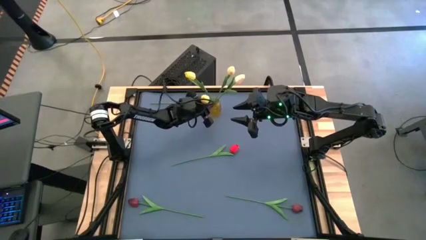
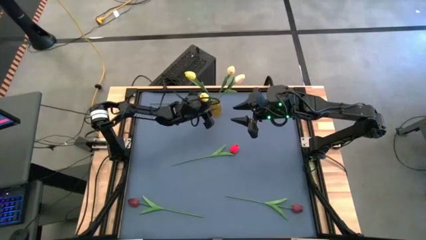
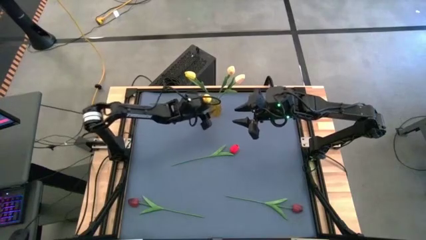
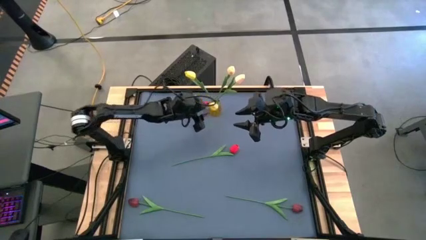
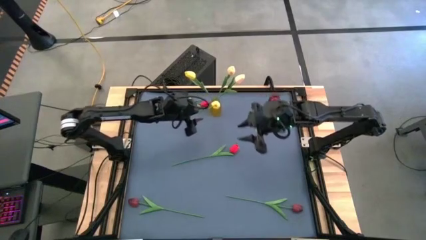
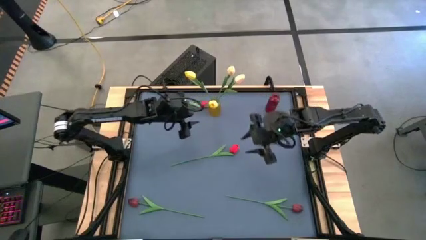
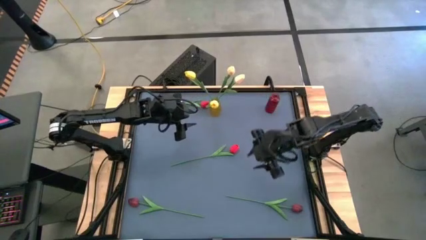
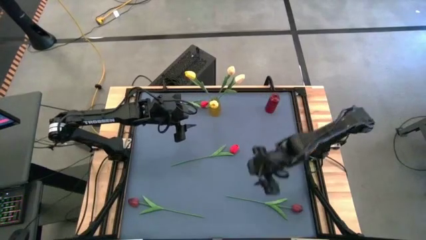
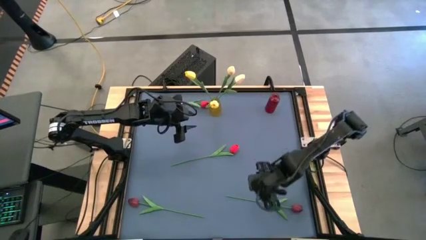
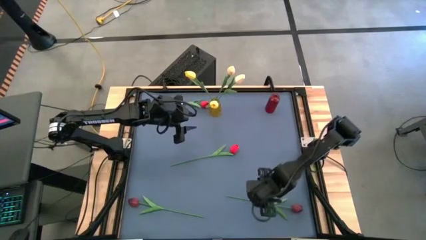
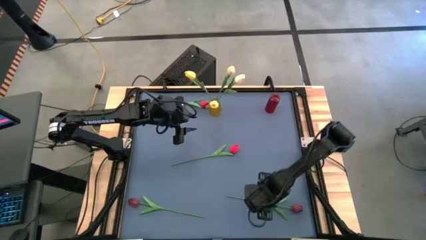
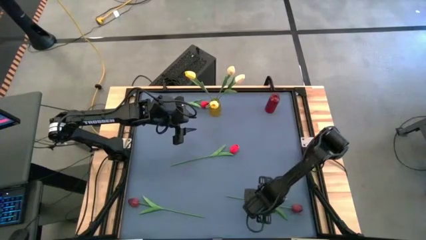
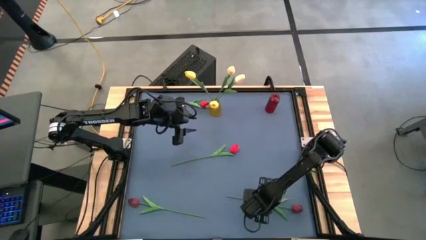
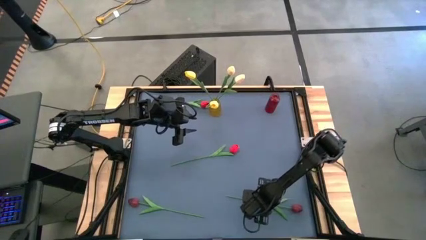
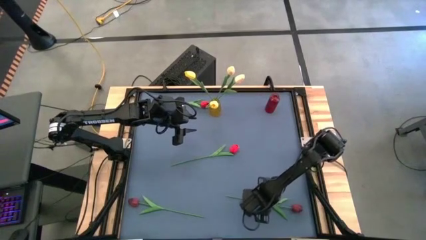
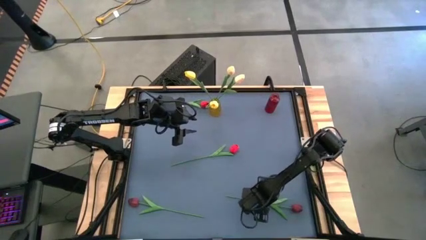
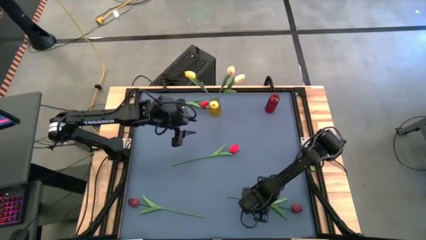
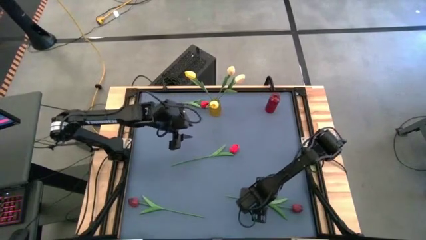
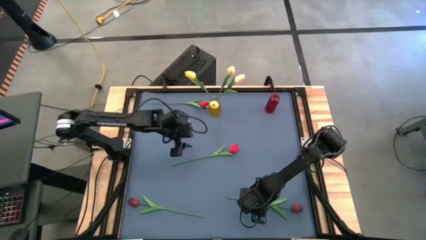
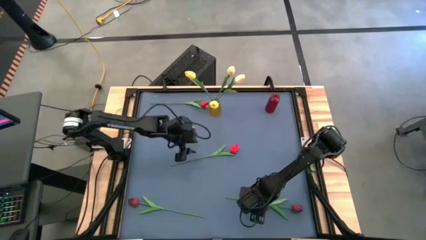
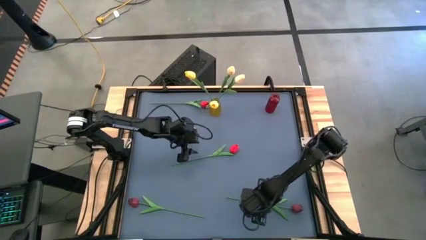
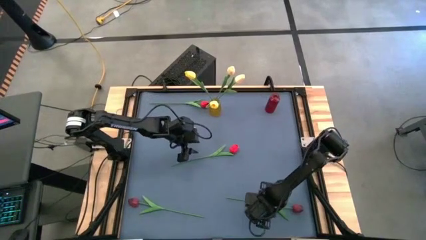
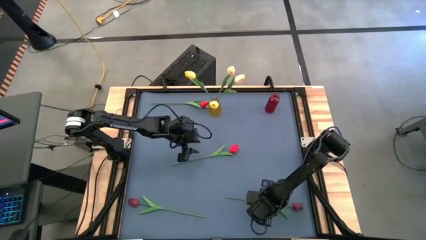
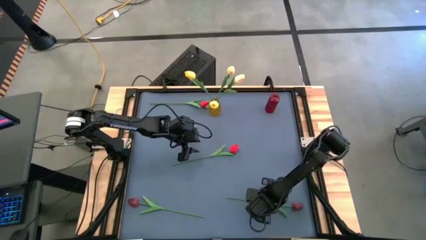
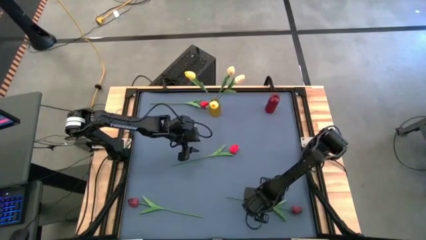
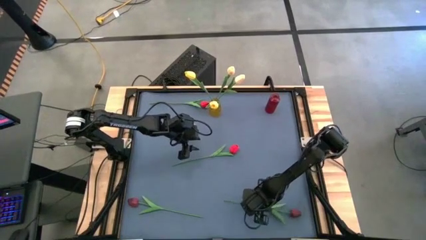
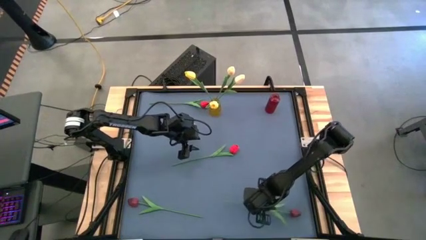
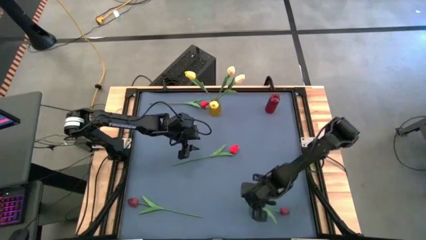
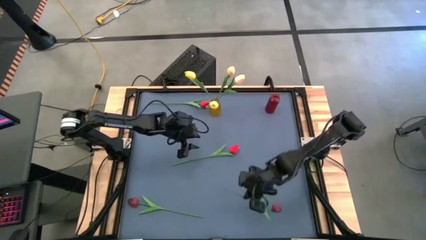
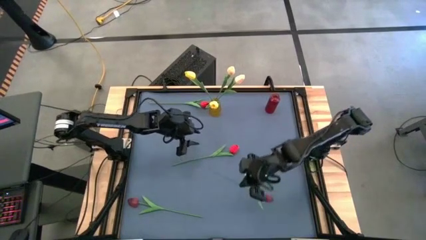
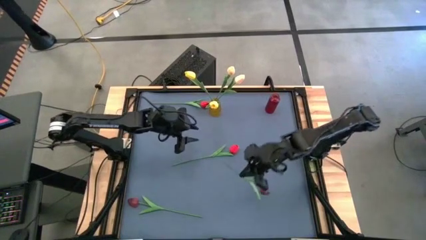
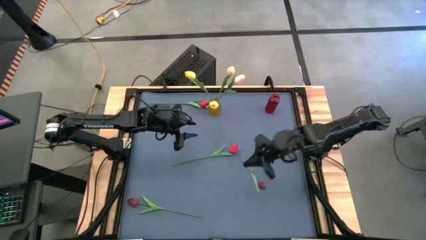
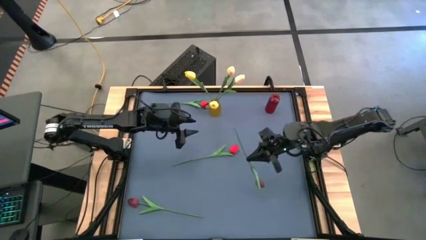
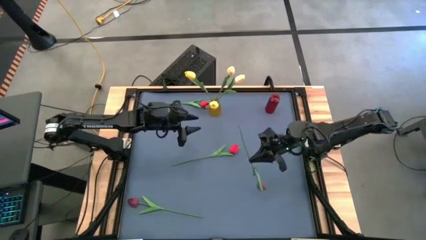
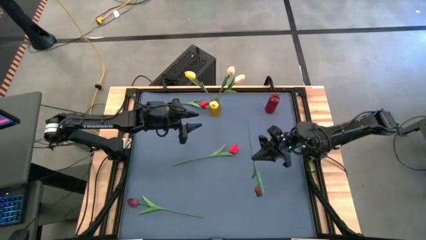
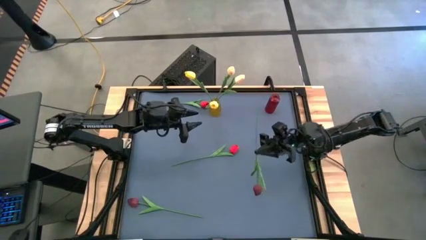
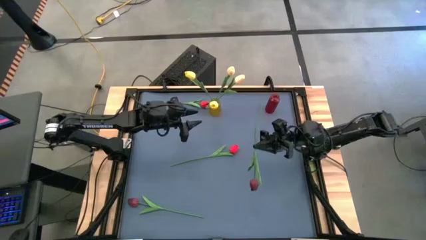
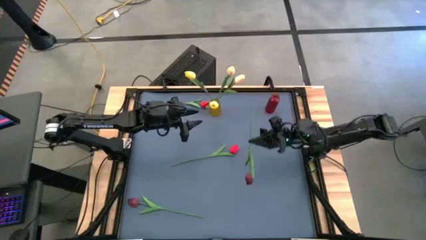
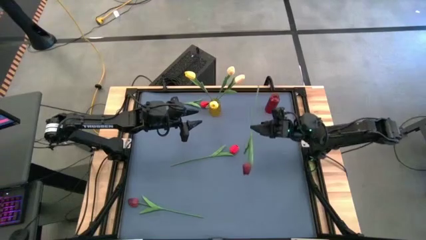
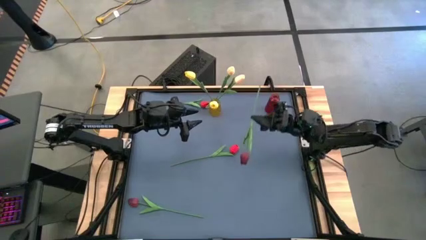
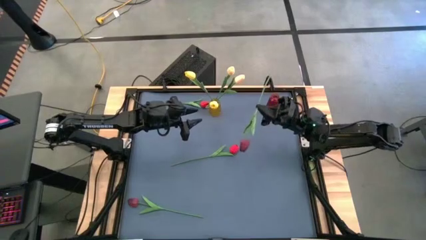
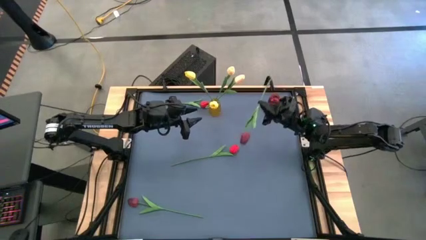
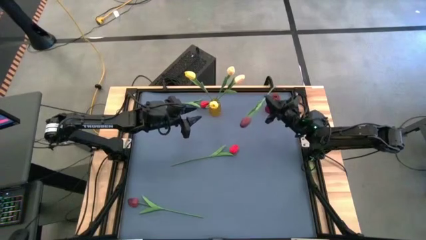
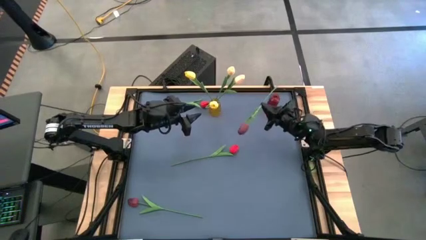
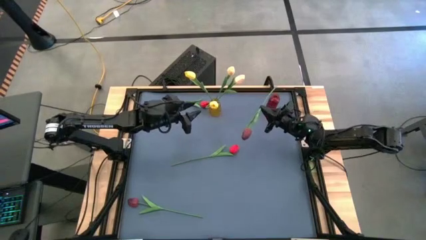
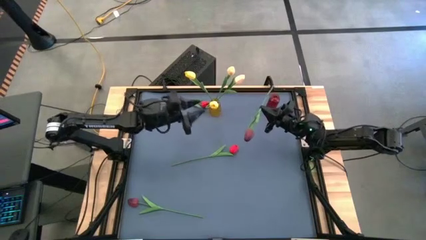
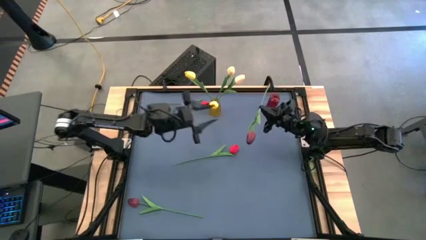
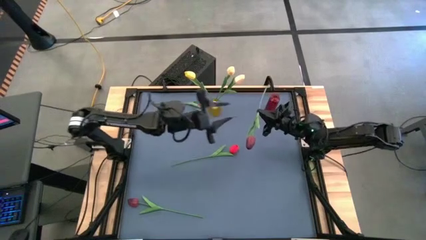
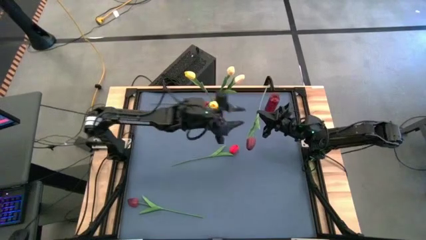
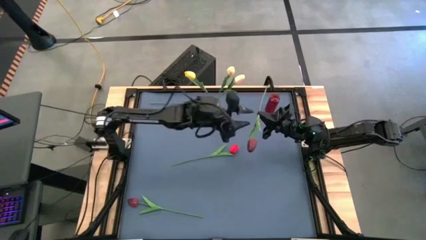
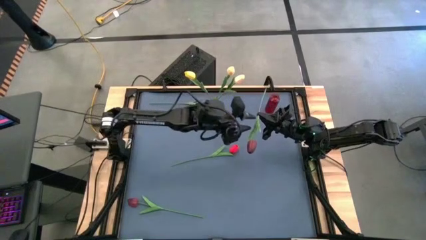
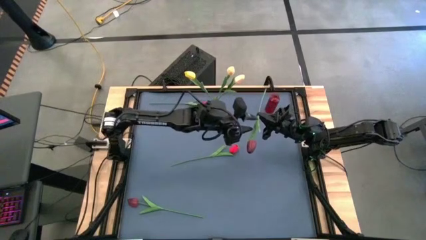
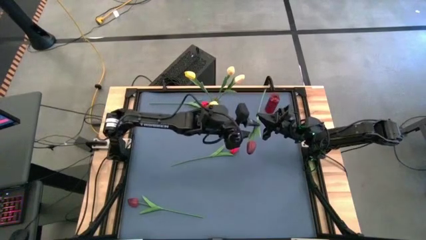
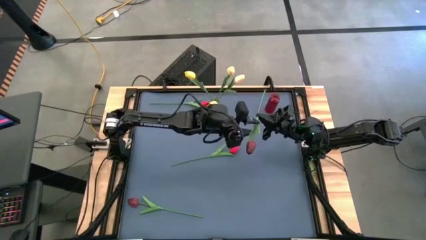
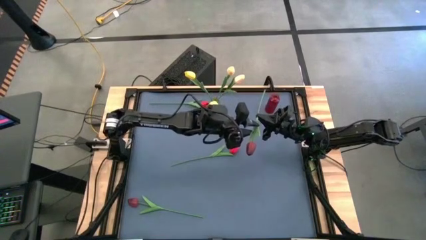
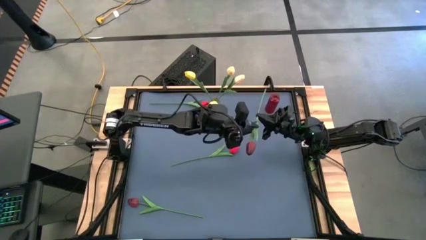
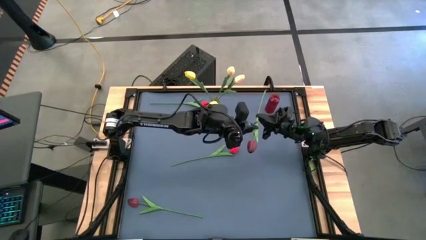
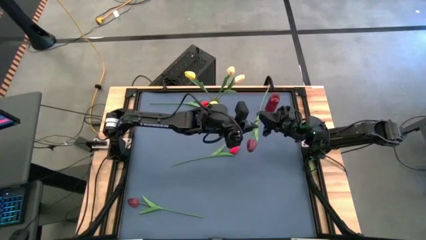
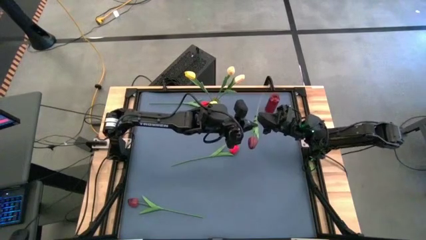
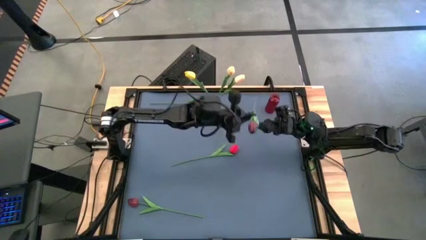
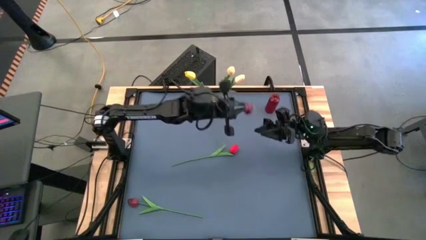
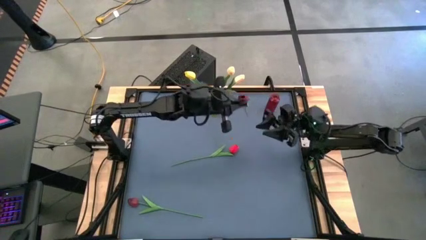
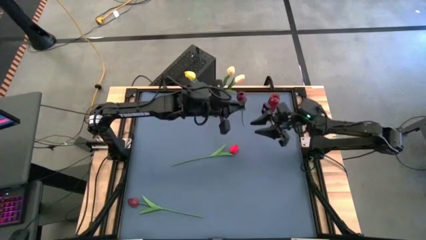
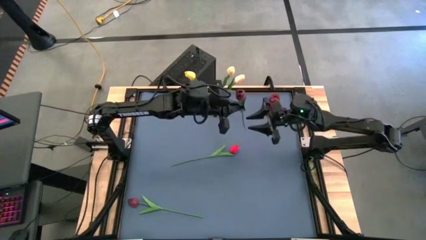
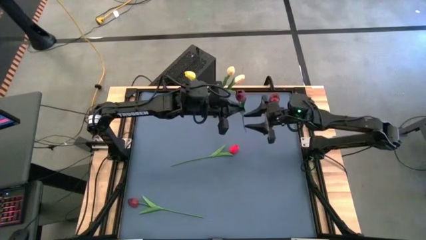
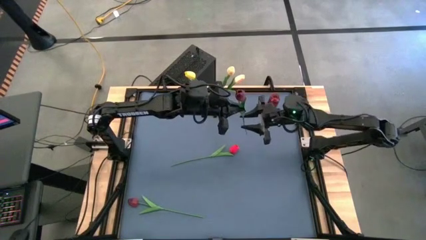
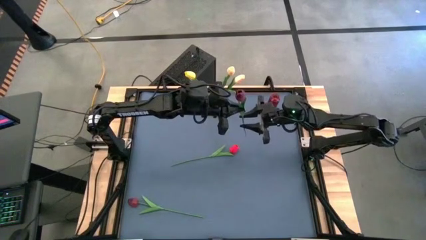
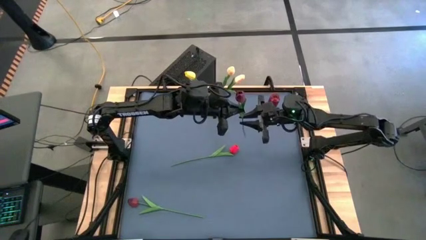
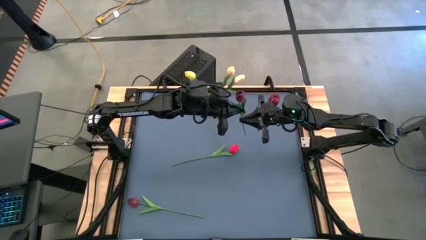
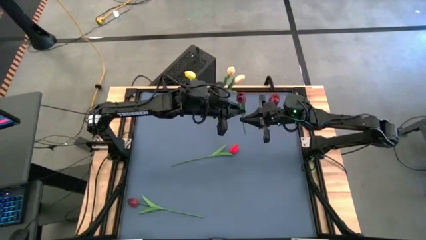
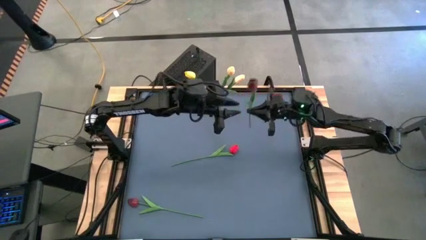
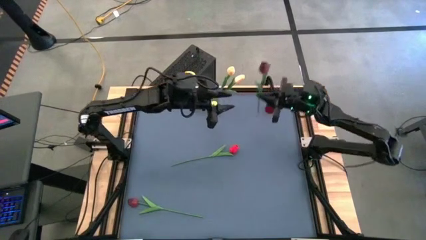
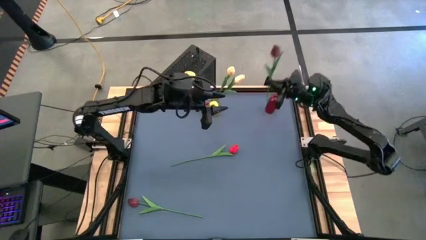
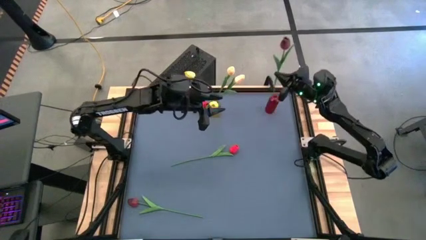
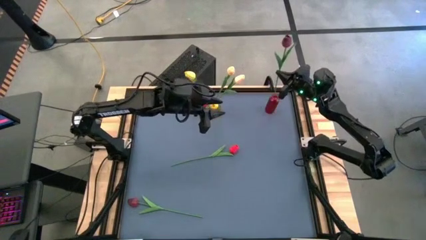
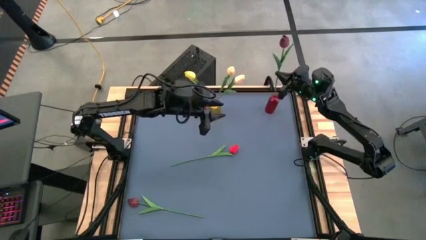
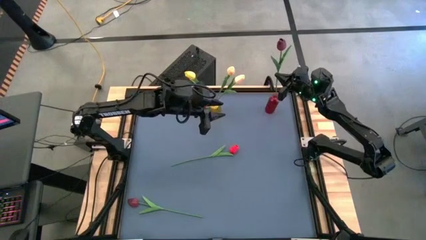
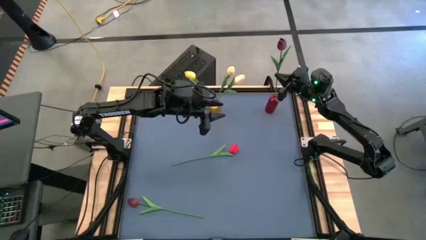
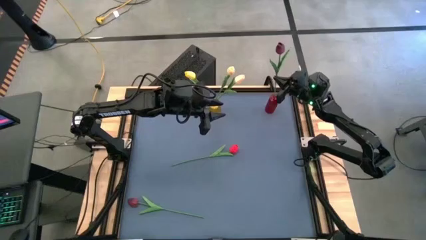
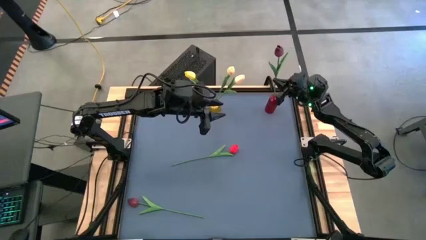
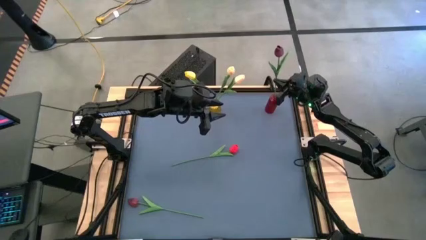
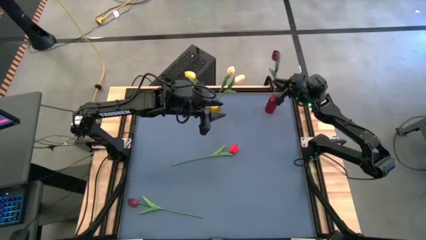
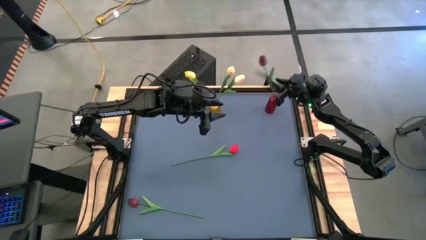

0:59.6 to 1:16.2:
Task: Sort flowers into vase by color
Put the right dark red flower into the red vase
